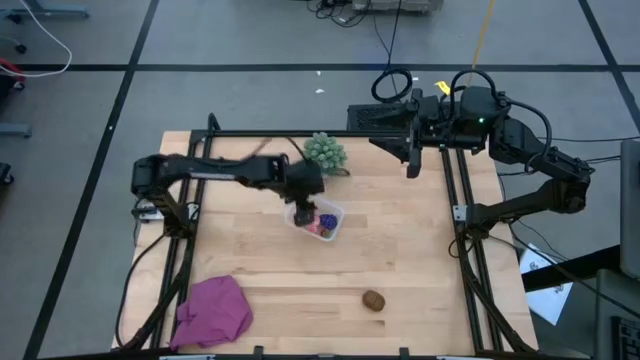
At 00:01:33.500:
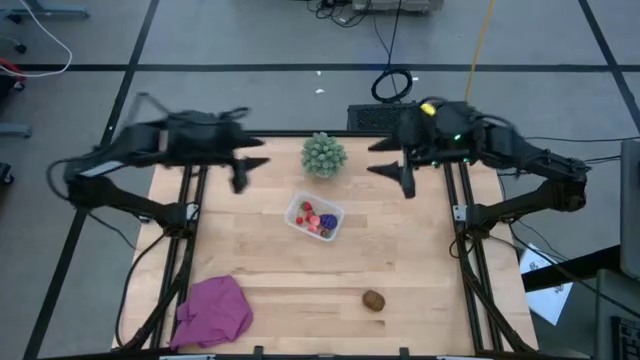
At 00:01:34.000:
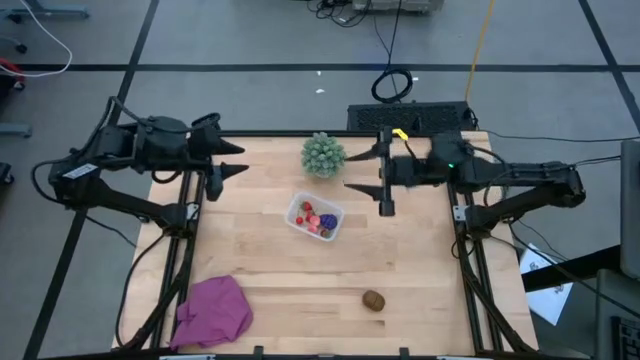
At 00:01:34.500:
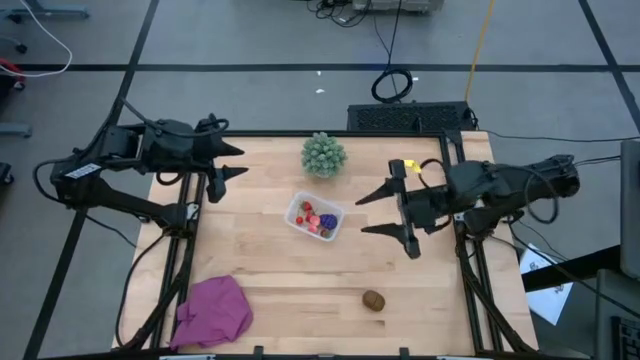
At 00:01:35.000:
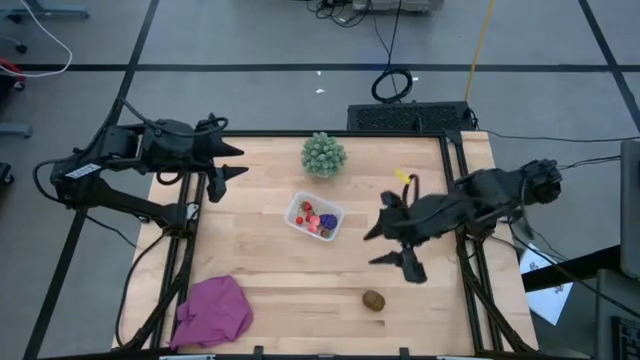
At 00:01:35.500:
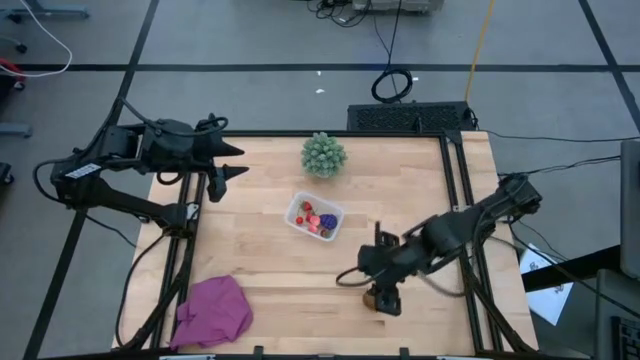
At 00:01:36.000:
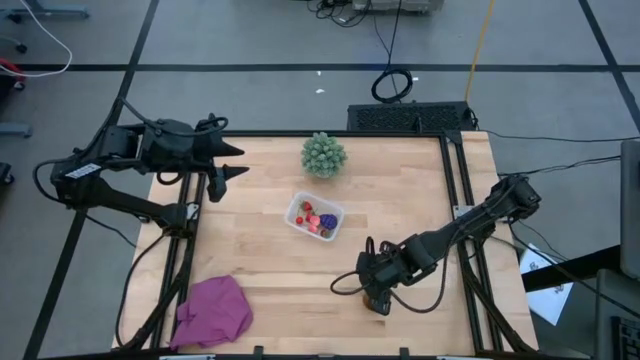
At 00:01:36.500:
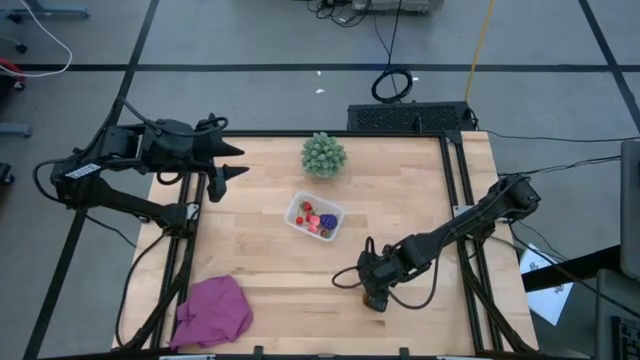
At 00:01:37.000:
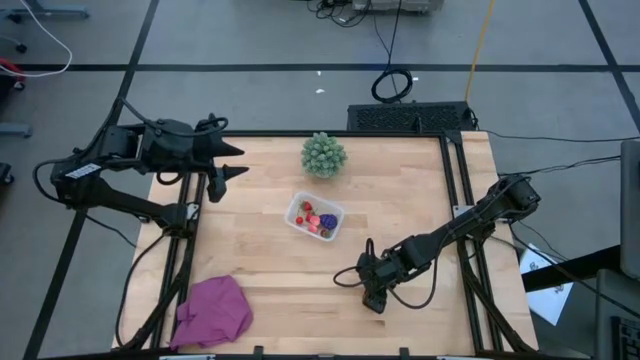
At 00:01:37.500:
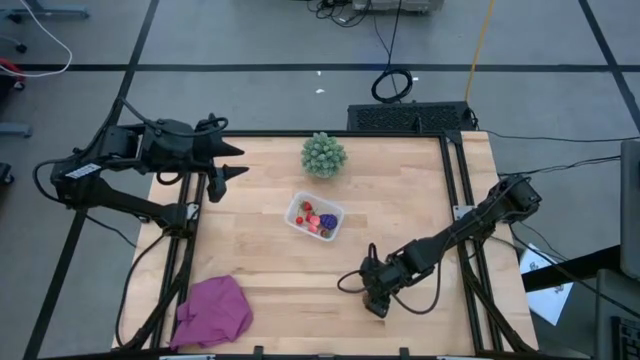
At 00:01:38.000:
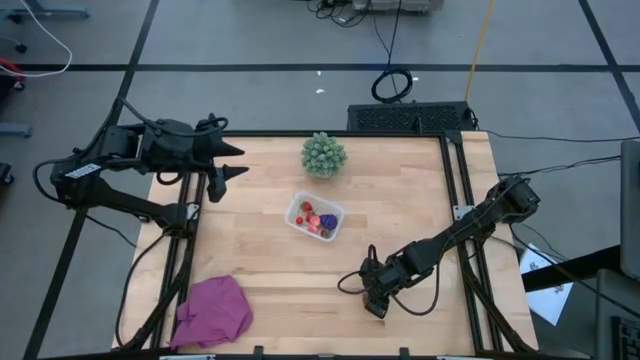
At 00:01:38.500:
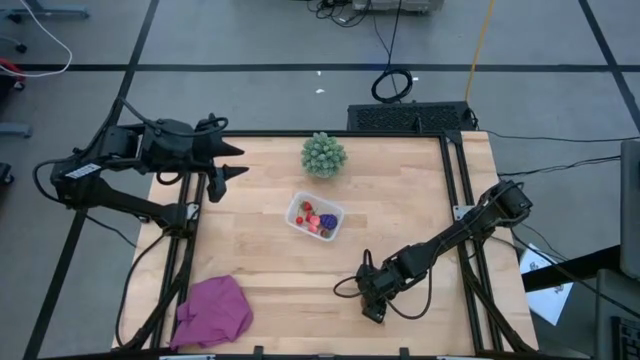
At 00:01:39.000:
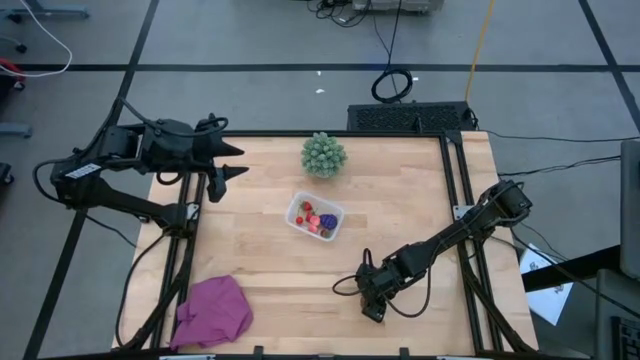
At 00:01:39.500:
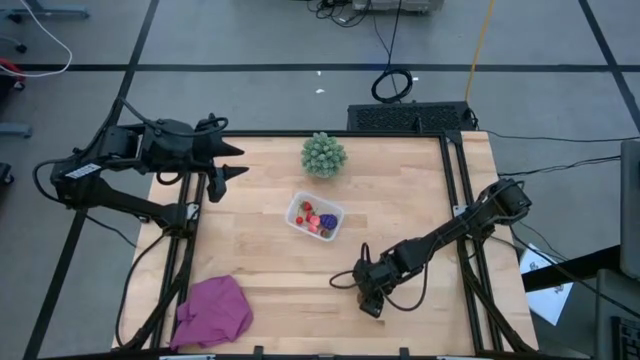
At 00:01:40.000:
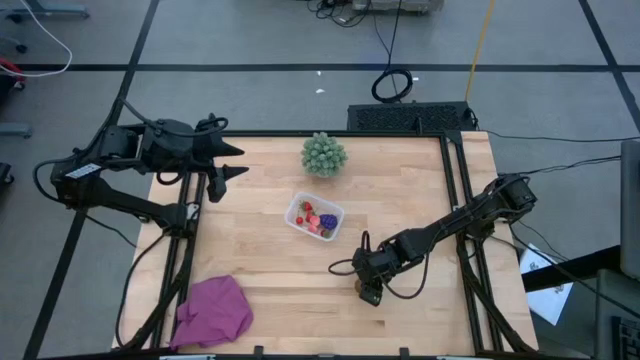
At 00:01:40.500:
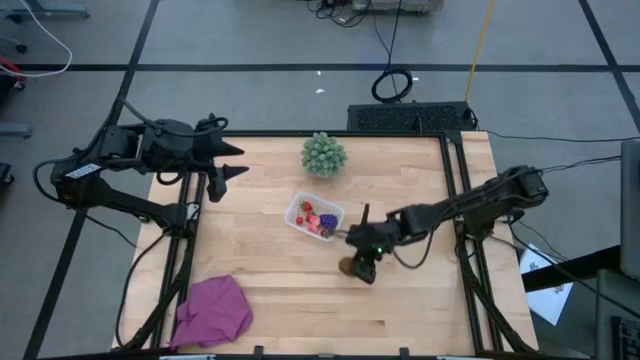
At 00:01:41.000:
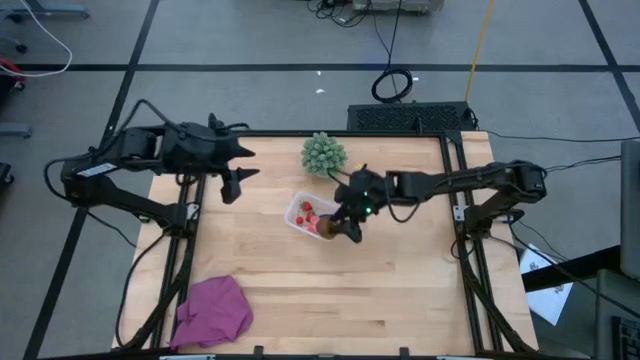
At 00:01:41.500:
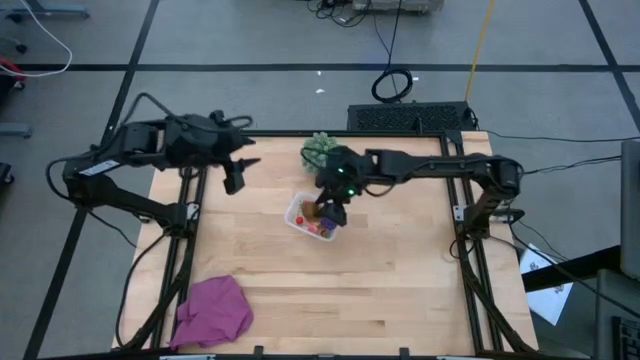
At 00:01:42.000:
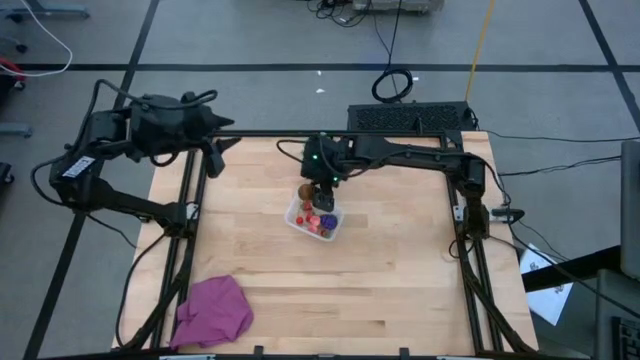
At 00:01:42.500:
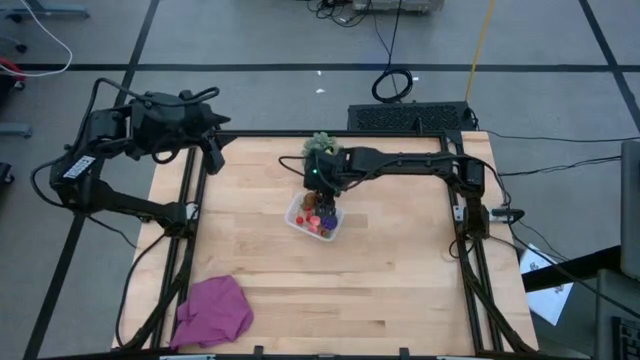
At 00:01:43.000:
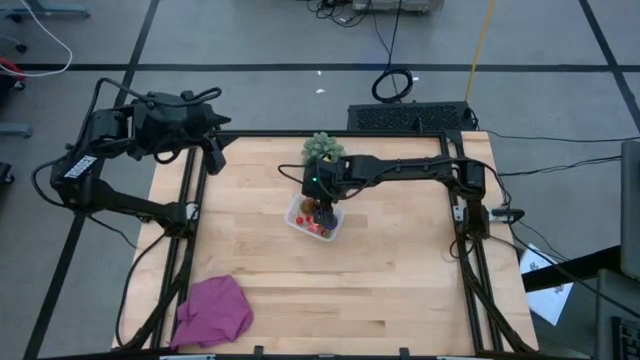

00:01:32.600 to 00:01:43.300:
Task: Pick and placing Produce into tupperware
Put the kiwi into the transparent bin

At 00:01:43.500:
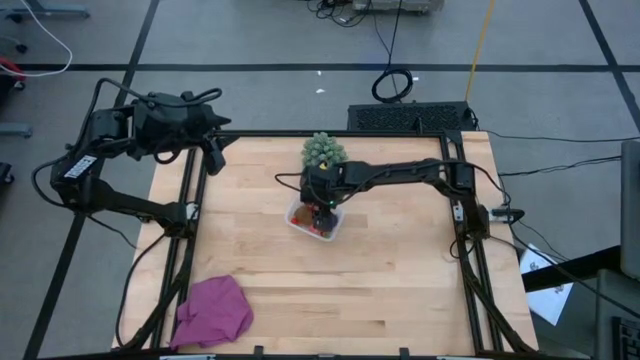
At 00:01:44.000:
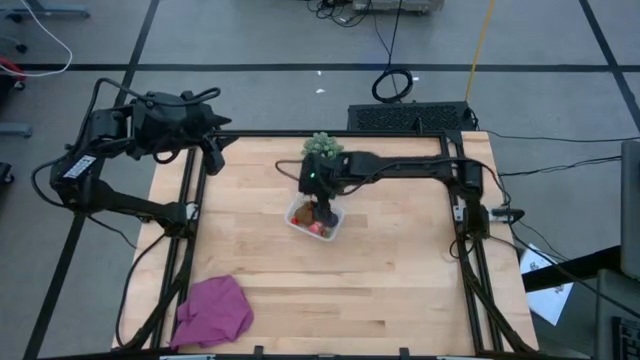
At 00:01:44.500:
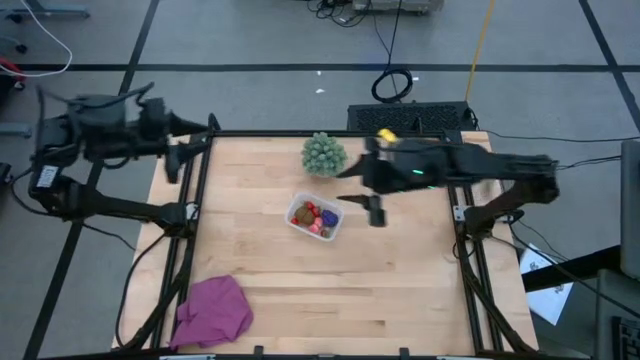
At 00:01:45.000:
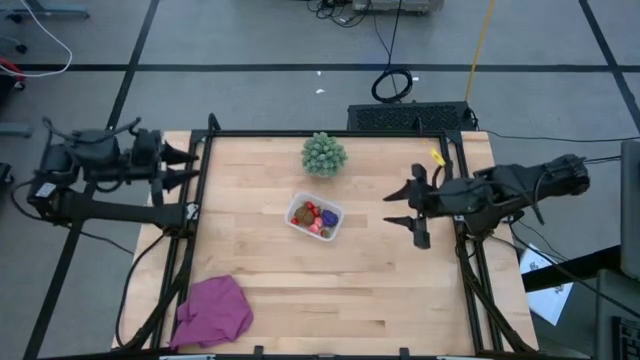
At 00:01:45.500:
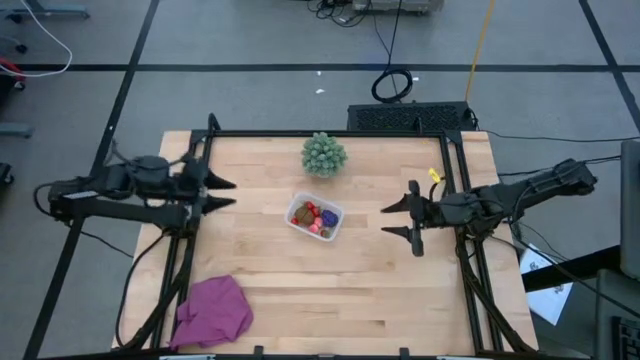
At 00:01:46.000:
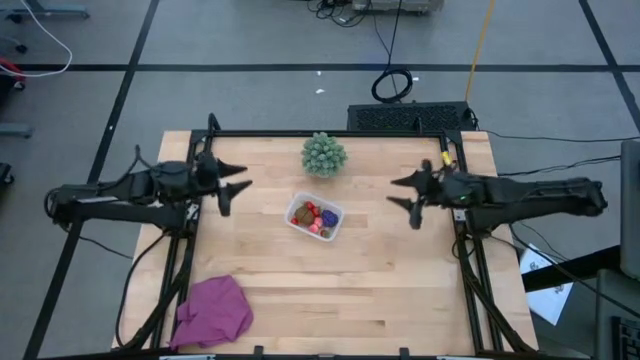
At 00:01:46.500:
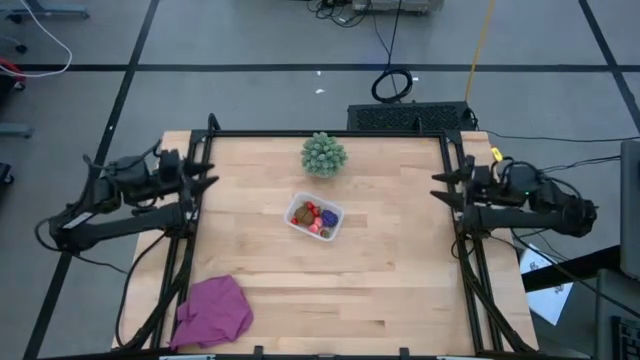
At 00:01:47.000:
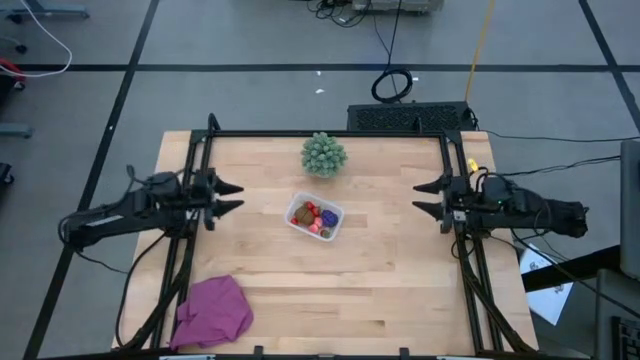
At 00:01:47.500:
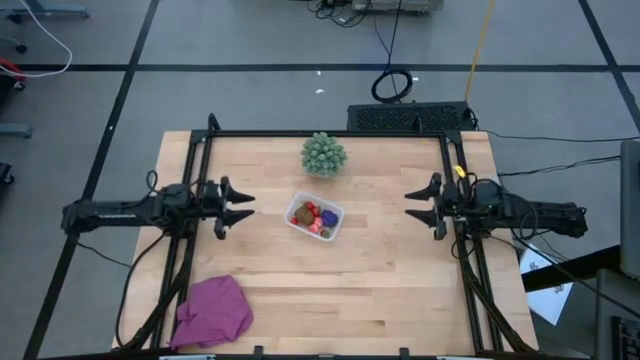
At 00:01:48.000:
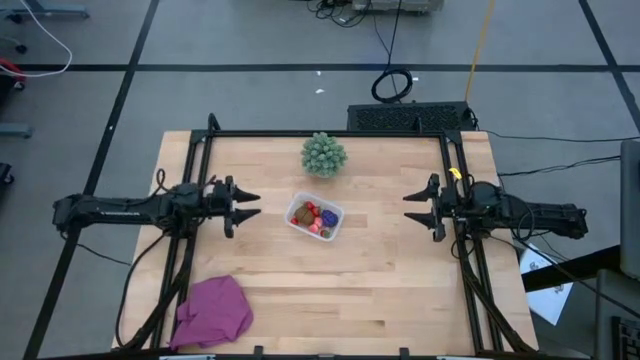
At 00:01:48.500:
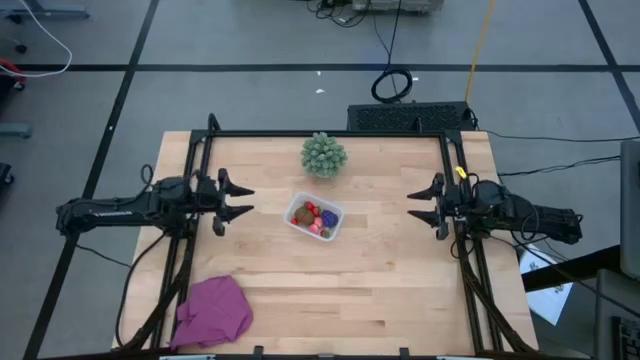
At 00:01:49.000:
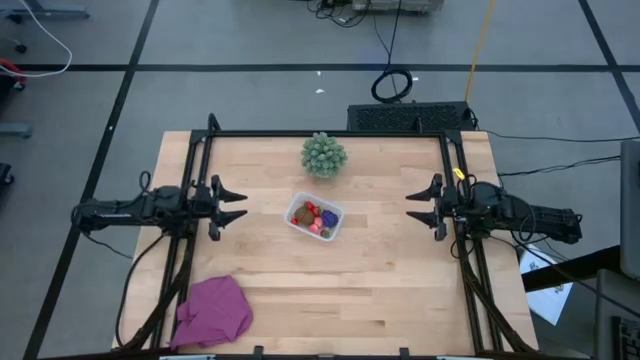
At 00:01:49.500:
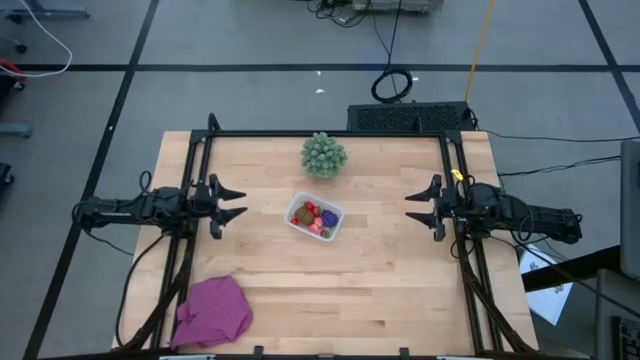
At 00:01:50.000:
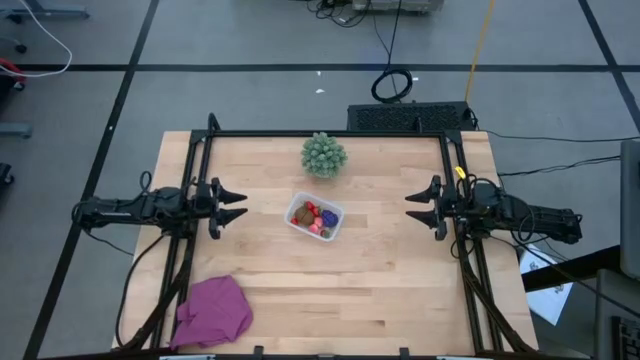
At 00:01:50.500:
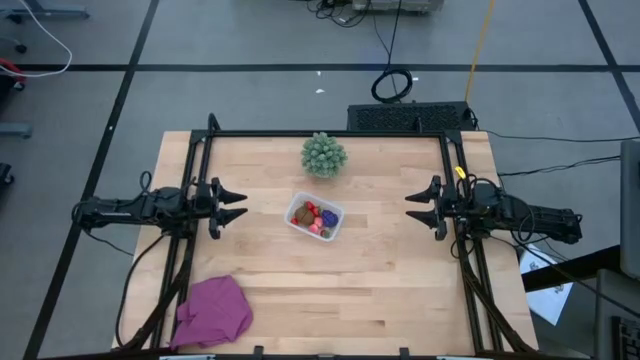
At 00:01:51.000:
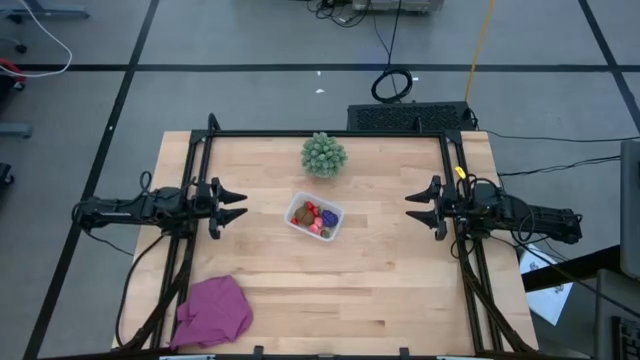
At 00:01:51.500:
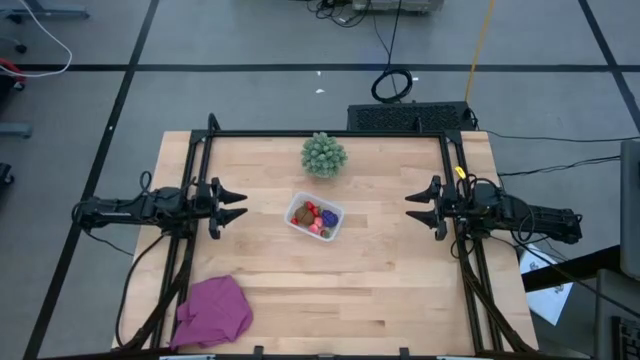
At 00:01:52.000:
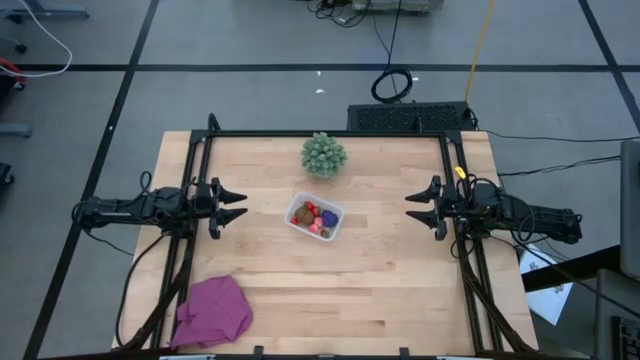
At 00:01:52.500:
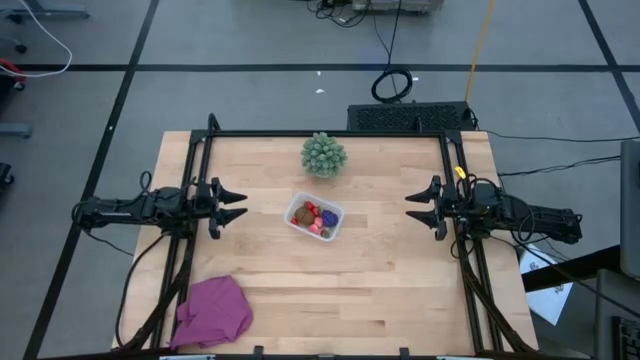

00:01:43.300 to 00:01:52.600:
Return to Home Position

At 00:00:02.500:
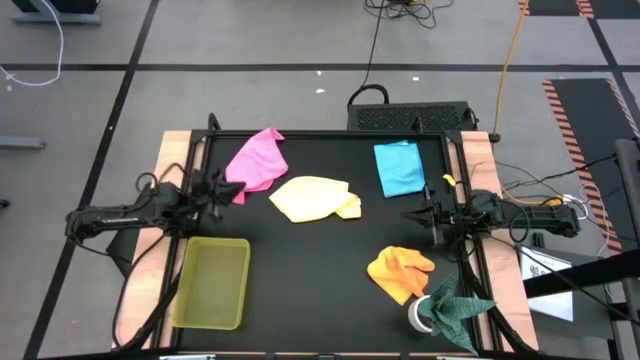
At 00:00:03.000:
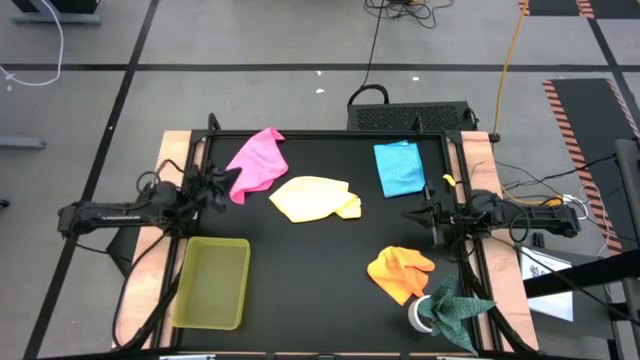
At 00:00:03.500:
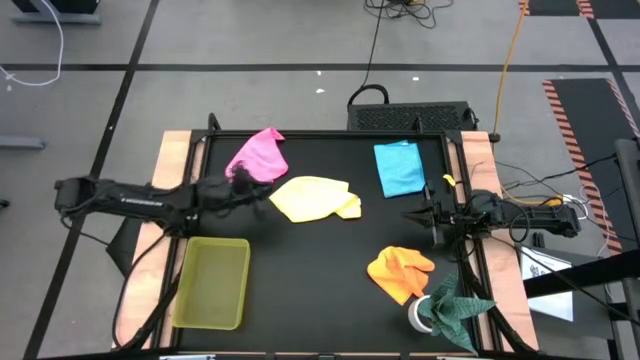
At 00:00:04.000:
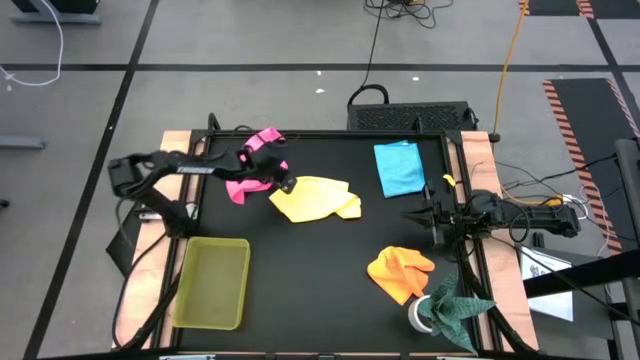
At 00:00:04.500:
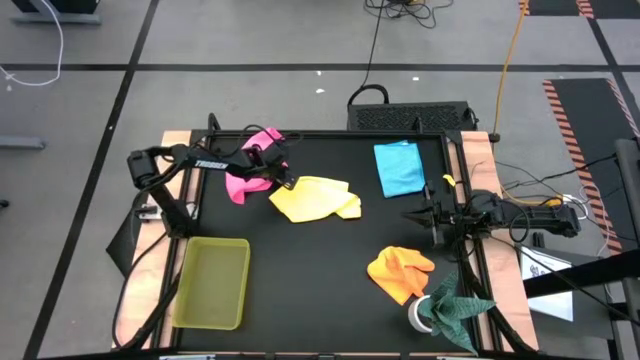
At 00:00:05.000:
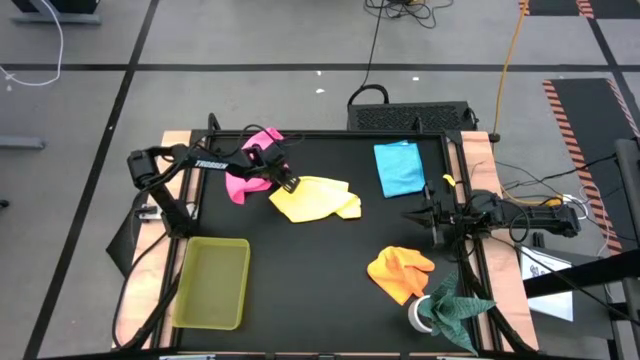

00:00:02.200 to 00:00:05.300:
Task: Fold microfiber towels
Fold the pink microfiber towel
